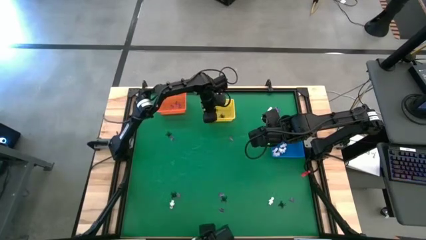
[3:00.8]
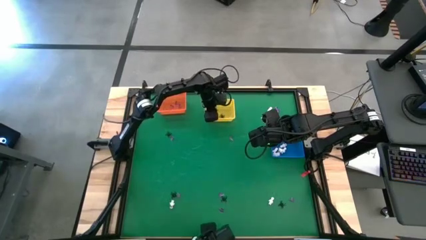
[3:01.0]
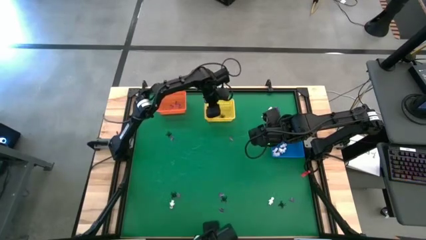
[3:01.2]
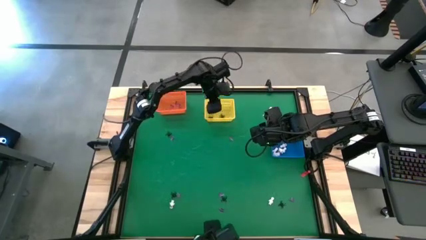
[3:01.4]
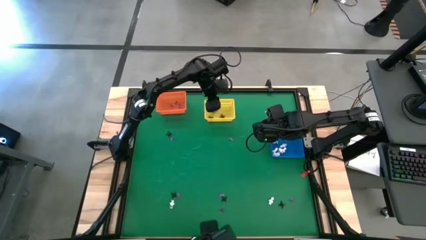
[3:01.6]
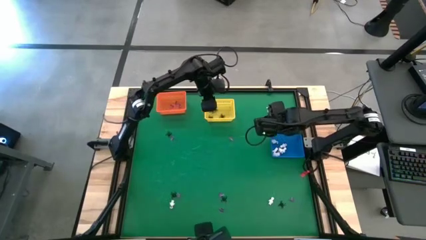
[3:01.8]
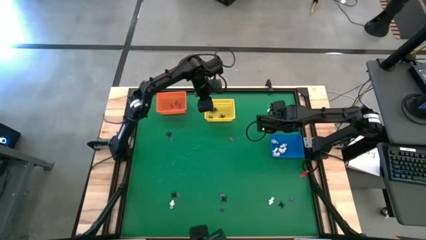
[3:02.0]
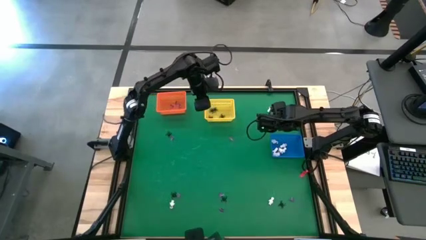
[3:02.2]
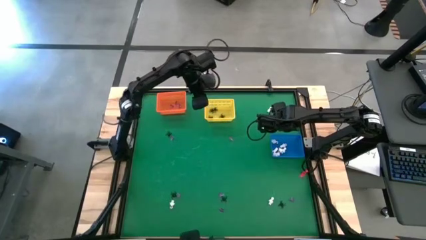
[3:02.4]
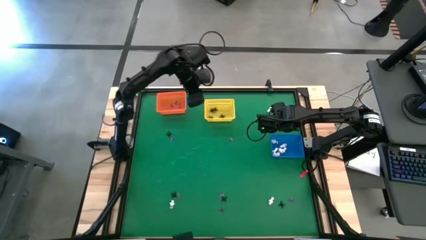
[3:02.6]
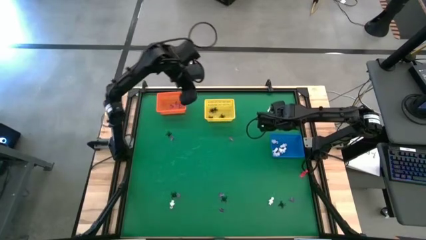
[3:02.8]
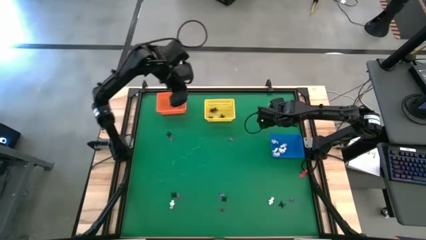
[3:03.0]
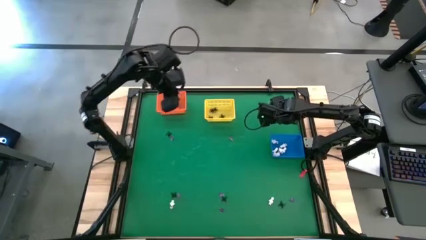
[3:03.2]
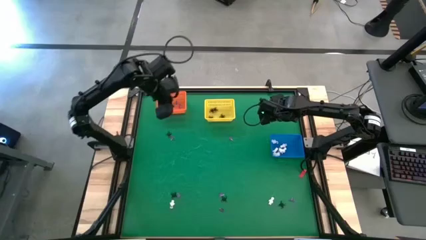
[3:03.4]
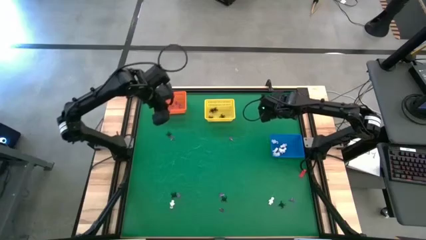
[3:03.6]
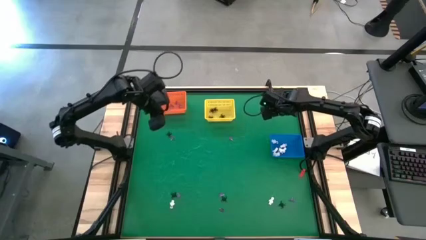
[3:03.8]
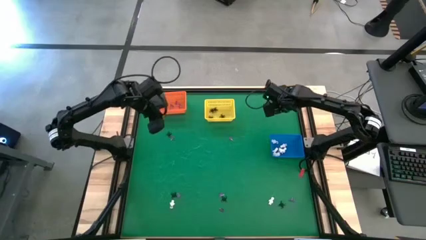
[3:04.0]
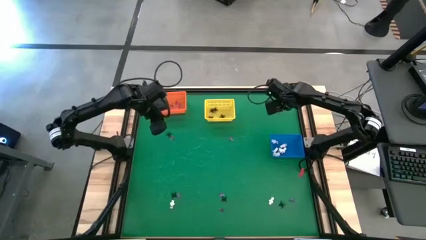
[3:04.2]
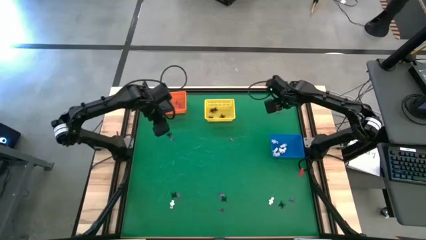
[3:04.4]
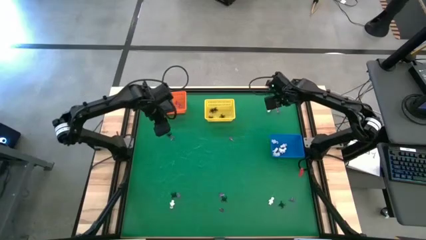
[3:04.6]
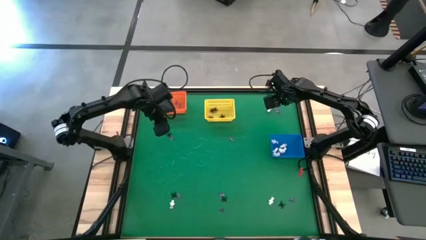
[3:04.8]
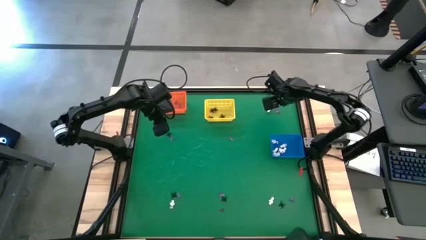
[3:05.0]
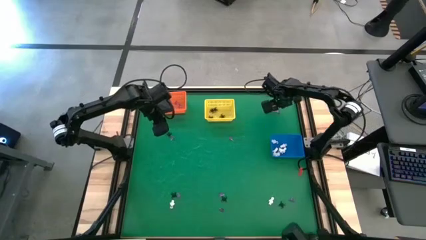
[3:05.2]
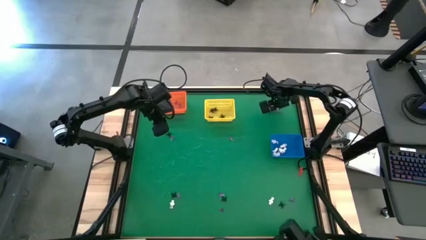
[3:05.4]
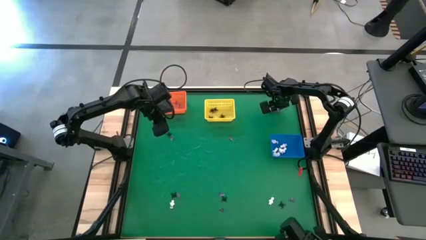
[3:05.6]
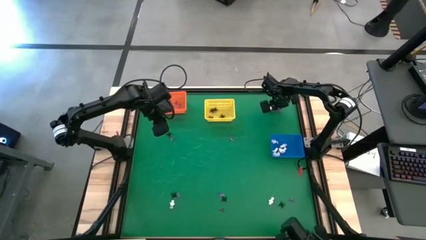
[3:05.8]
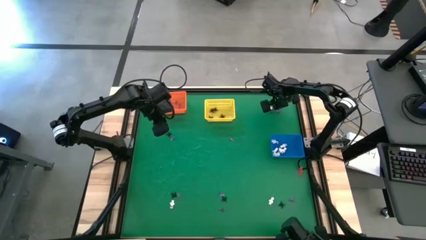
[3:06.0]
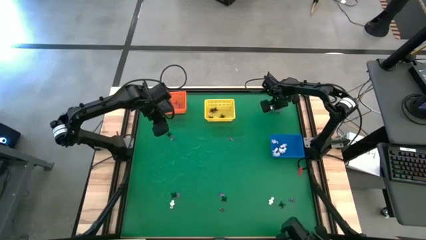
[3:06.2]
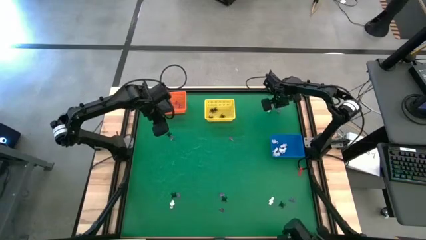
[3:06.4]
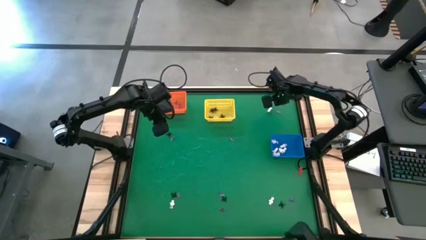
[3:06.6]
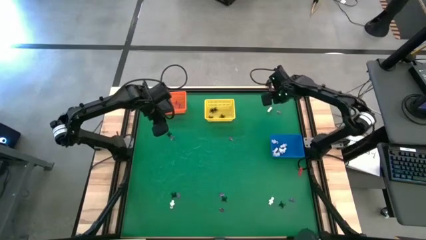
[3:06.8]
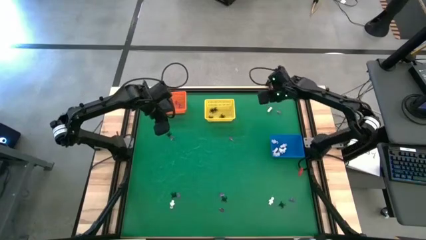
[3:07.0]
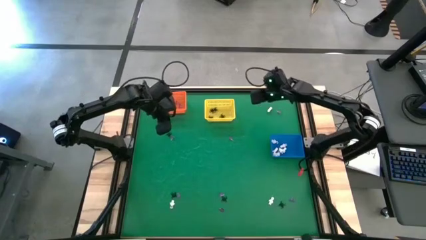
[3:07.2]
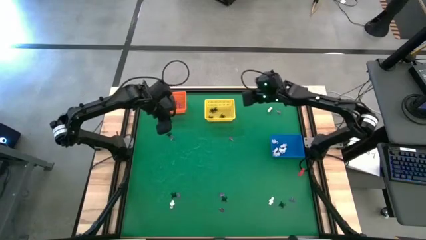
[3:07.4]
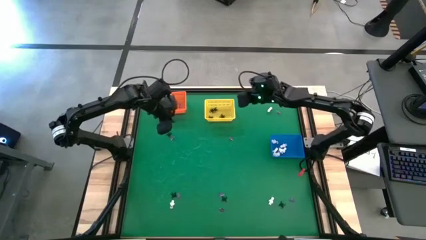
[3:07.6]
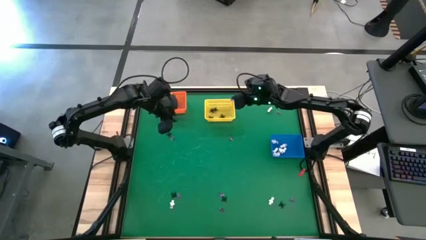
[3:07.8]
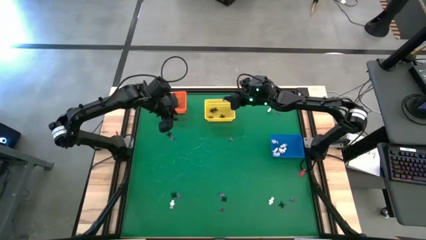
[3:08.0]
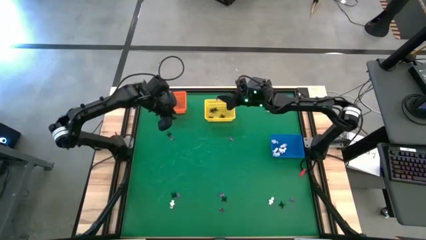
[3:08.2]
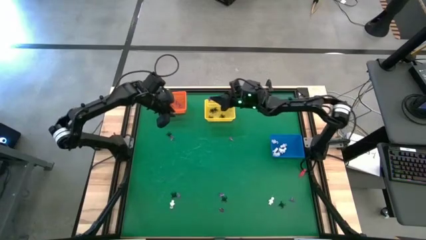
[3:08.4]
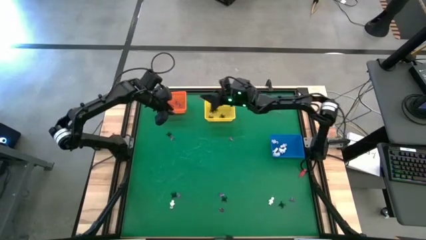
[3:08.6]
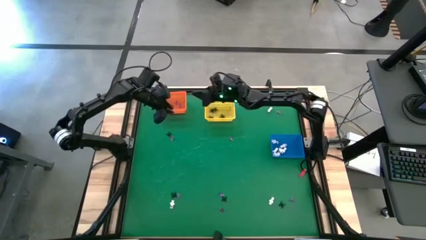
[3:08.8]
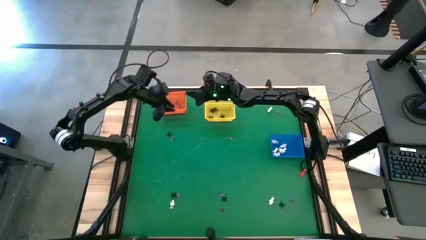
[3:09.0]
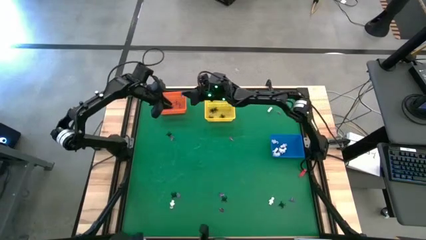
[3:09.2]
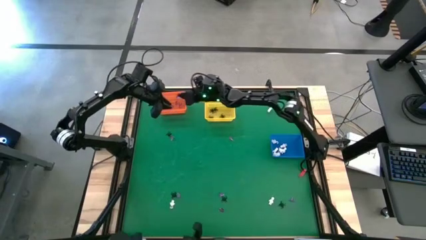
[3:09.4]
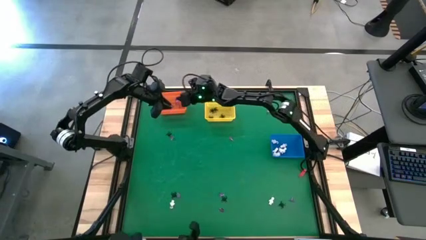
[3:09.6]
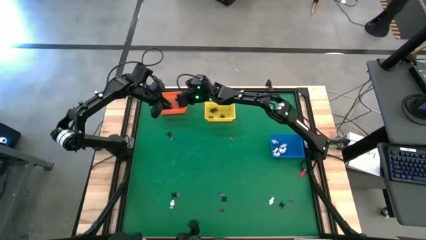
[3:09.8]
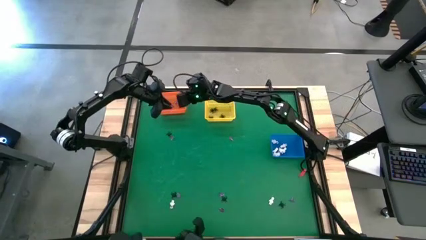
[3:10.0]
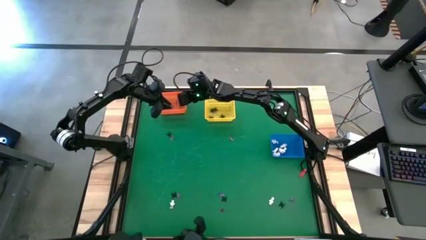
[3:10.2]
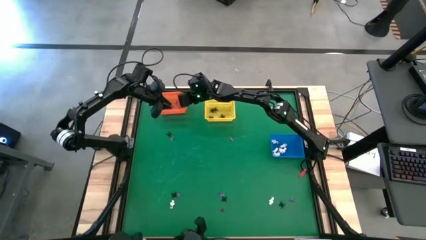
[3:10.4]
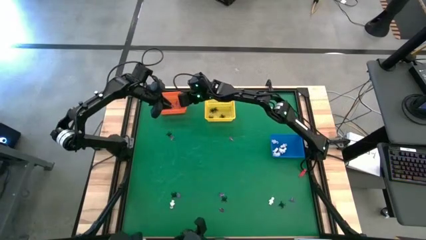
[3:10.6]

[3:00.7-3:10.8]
Task: Sort Halloween decoration
Put the violet hat toy into the orange basket

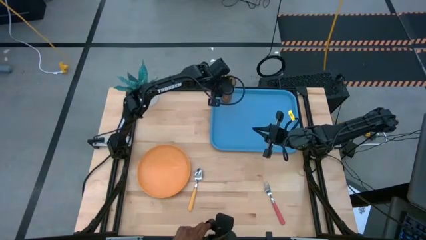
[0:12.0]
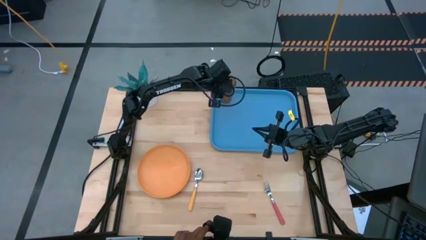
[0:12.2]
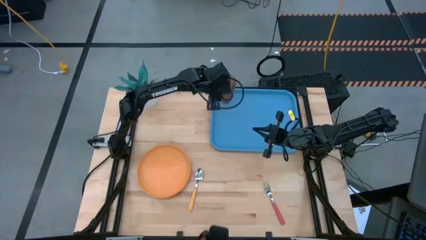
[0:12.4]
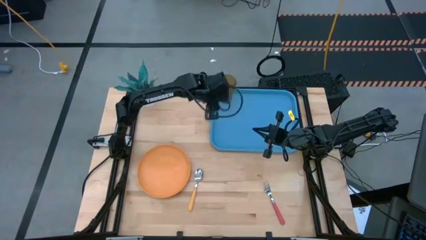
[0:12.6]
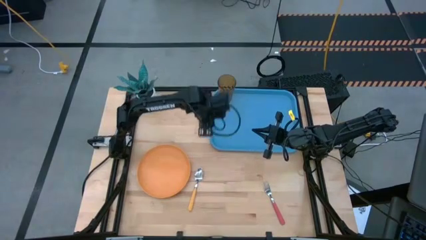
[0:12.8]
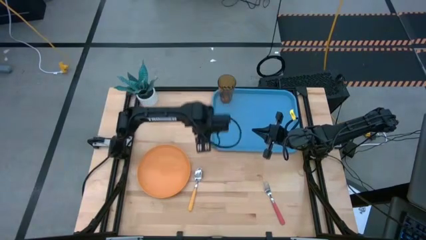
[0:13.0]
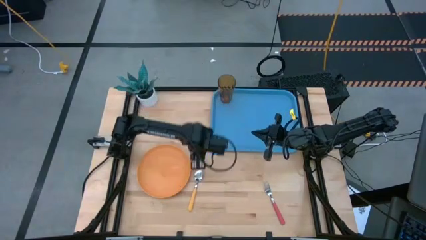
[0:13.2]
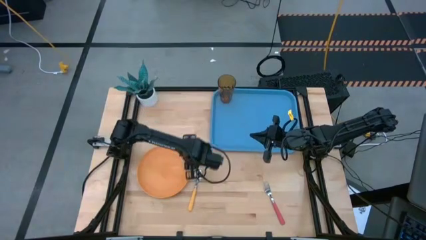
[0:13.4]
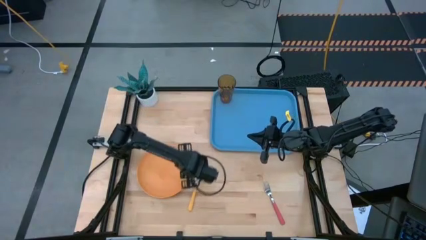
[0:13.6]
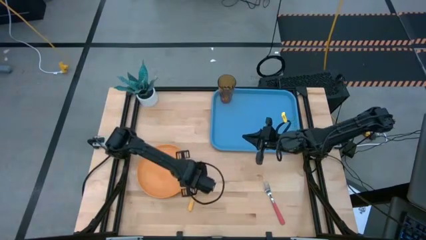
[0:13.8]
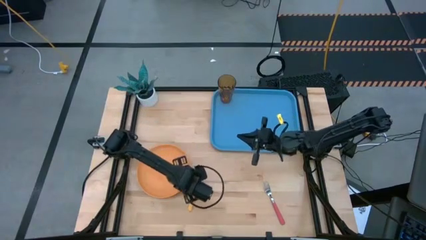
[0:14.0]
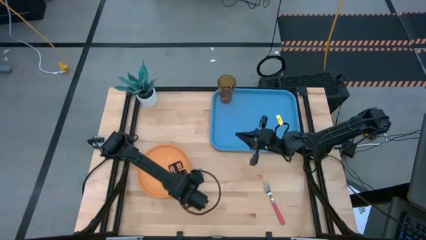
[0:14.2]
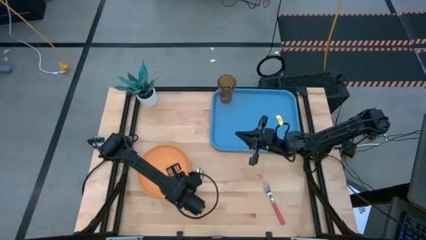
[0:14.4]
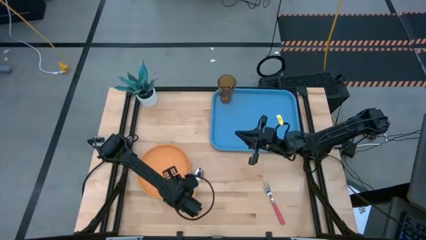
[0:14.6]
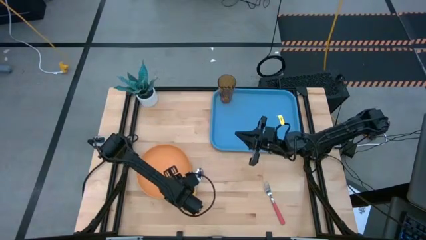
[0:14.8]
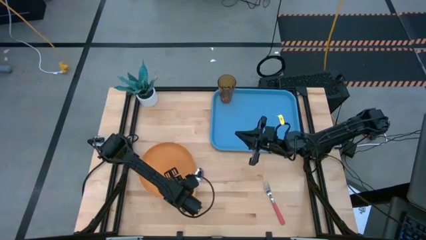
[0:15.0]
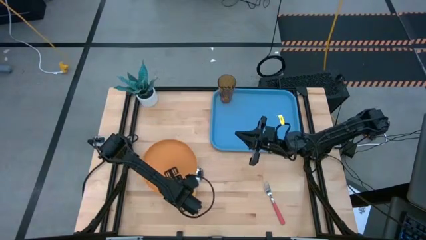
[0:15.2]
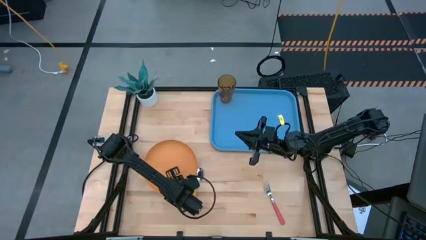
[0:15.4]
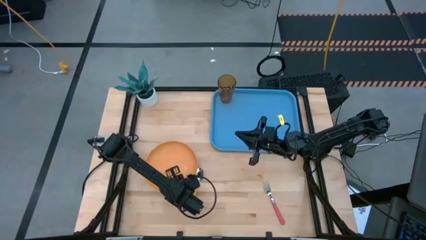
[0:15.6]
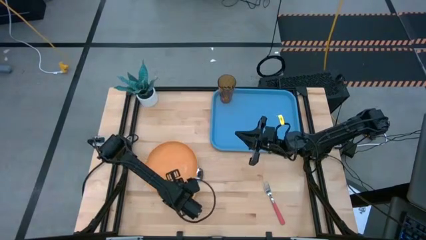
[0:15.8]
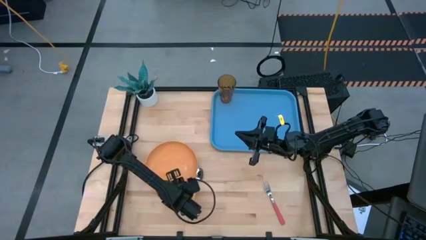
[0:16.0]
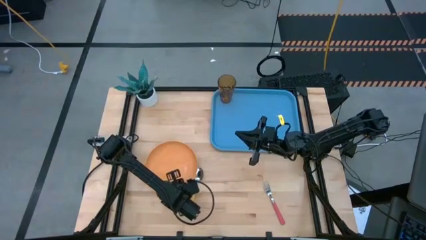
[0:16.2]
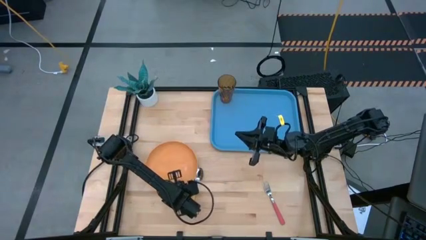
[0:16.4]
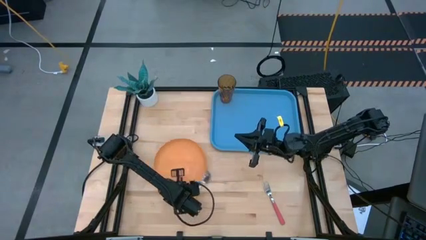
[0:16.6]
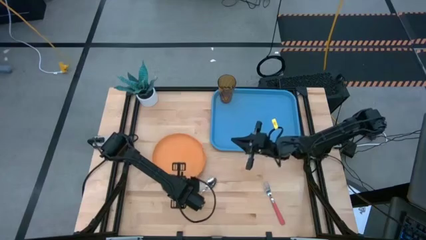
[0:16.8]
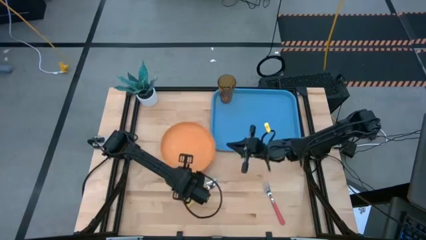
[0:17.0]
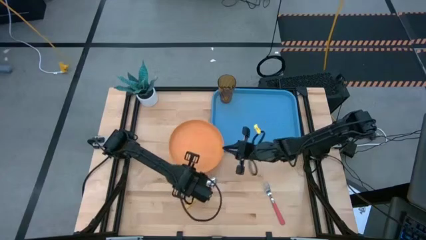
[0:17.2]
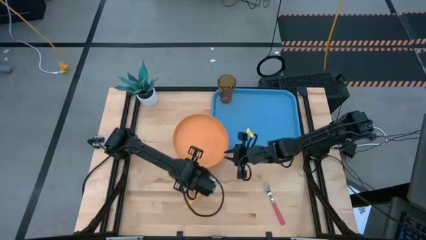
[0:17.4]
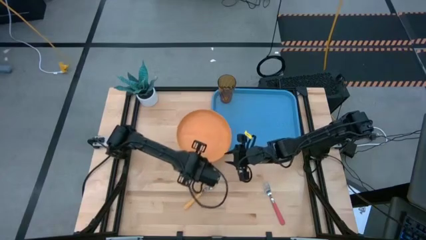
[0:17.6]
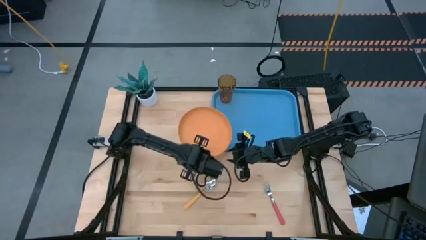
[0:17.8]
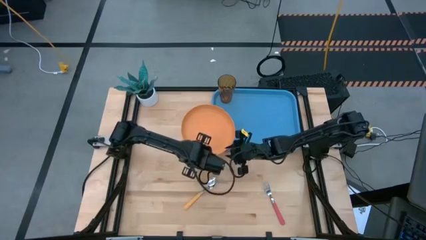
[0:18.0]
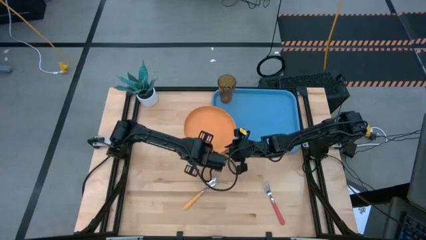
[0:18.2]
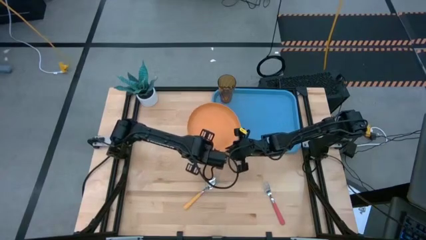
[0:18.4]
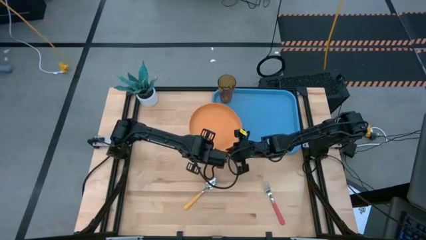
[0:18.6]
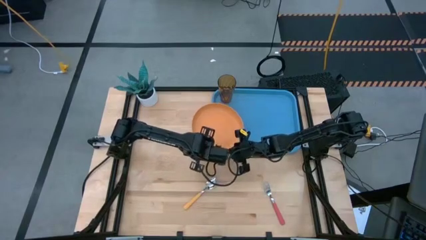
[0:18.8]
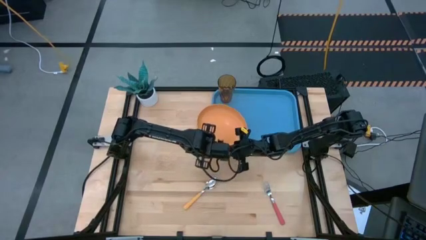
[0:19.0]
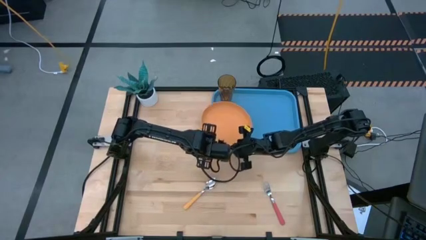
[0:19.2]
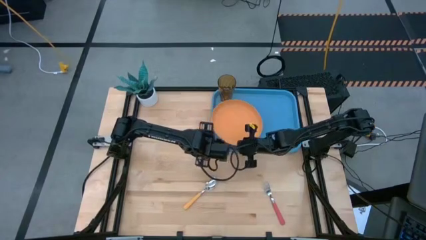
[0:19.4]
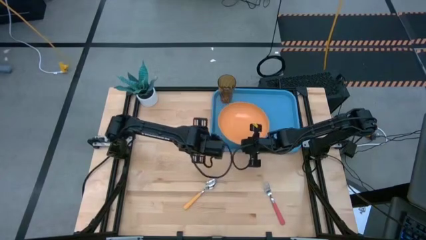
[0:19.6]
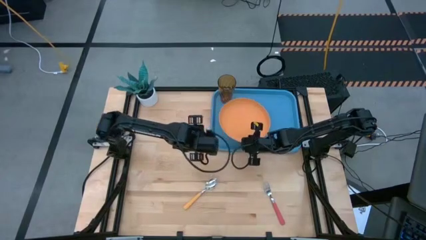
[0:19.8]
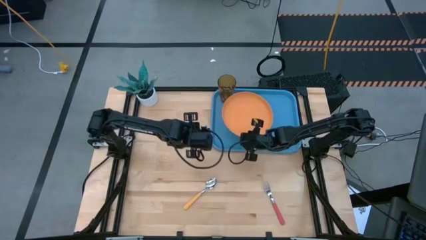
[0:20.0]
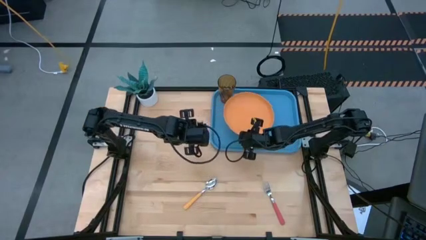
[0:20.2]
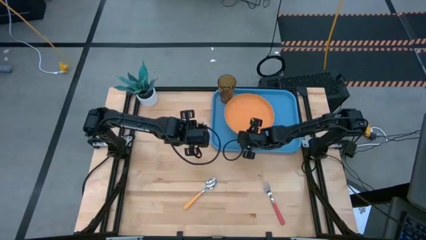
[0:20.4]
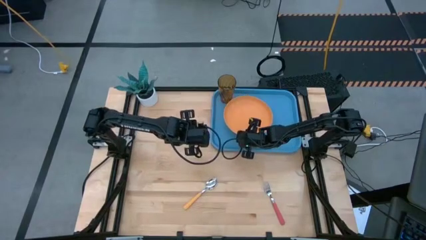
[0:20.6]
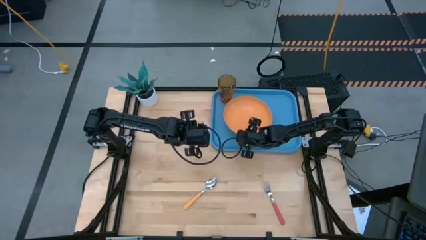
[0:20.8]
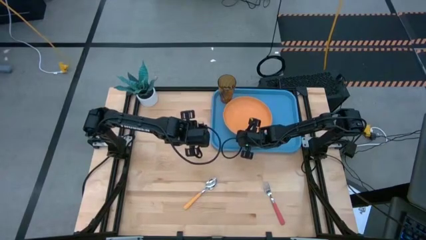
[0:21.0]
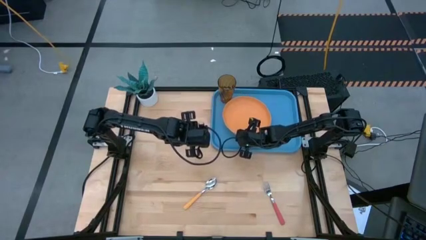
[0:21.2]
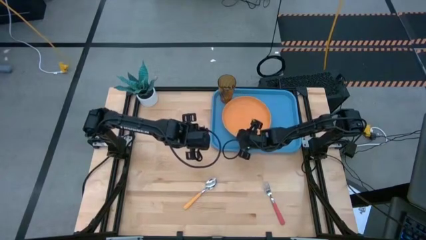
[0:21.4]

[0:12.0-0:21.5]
Task: Pick and place plate/cup/fork/spoon on tray
Put the orange plate on the blue serving tray
